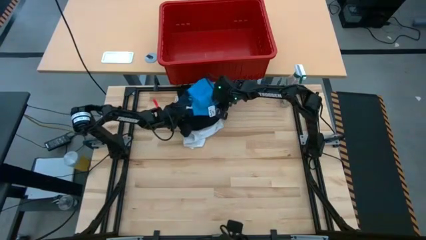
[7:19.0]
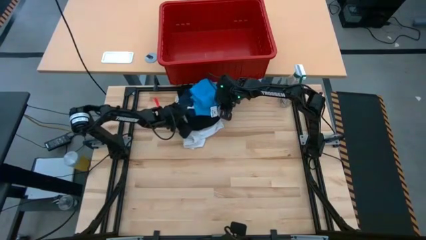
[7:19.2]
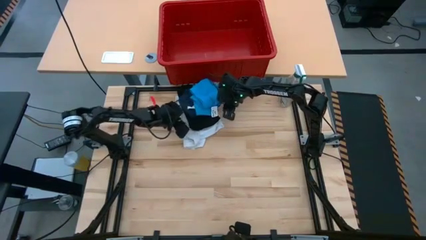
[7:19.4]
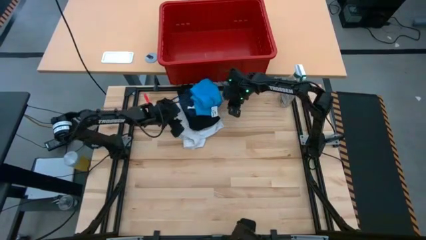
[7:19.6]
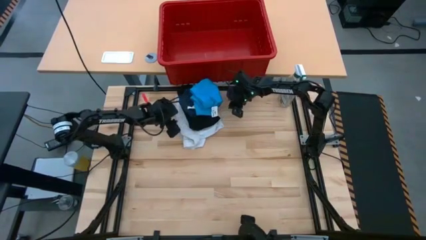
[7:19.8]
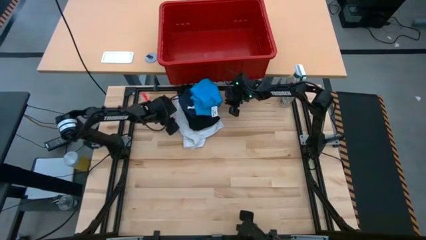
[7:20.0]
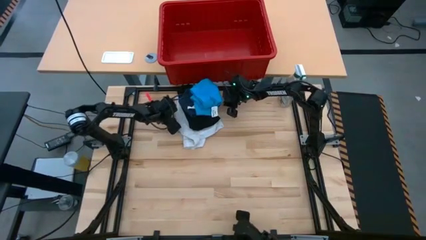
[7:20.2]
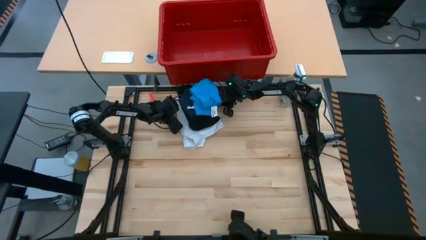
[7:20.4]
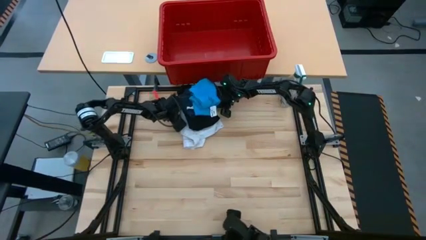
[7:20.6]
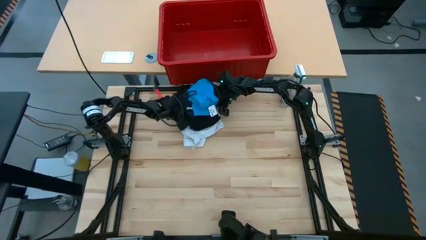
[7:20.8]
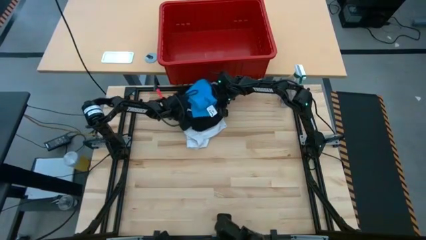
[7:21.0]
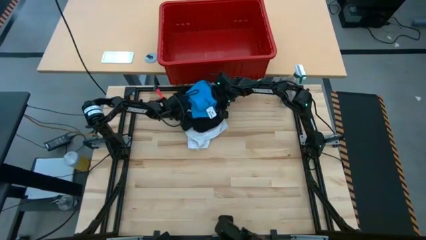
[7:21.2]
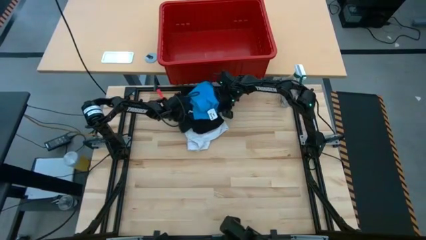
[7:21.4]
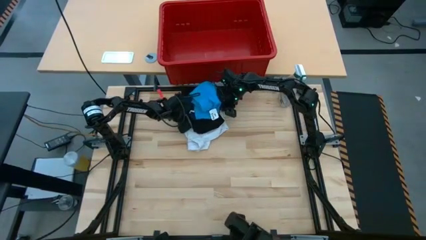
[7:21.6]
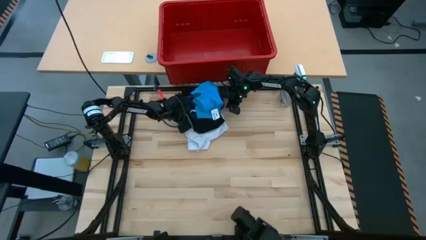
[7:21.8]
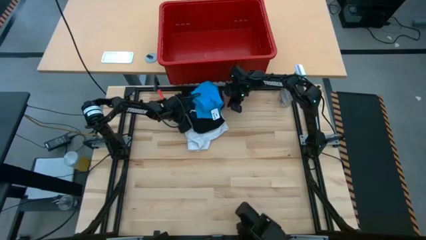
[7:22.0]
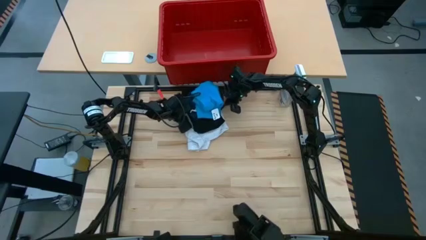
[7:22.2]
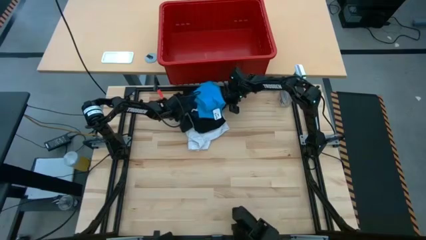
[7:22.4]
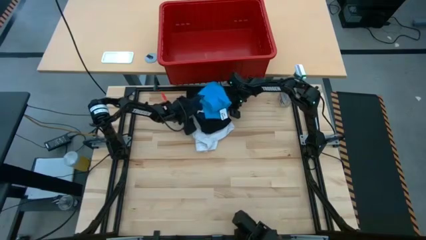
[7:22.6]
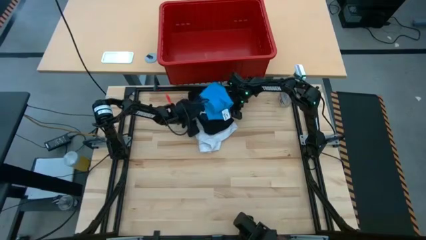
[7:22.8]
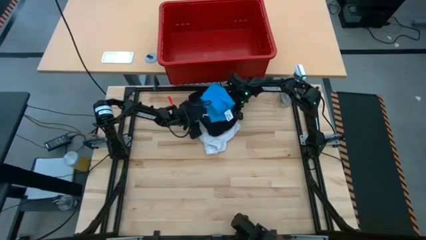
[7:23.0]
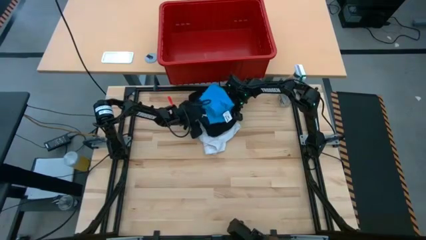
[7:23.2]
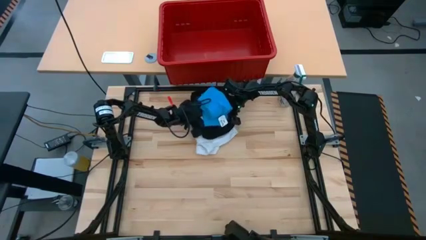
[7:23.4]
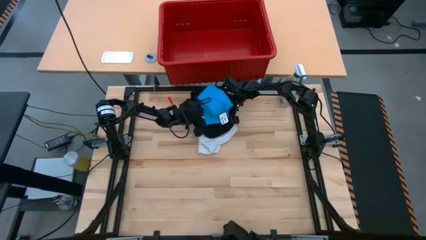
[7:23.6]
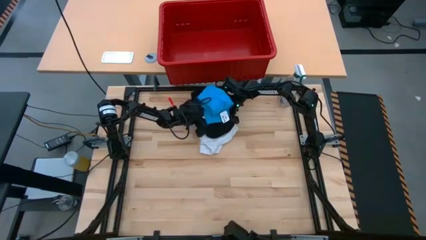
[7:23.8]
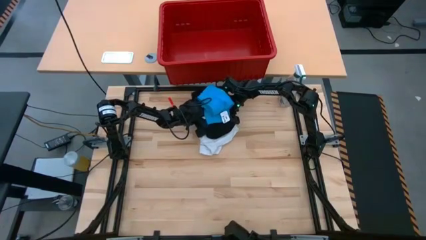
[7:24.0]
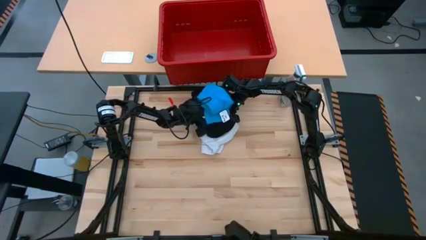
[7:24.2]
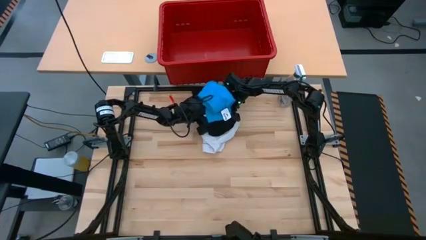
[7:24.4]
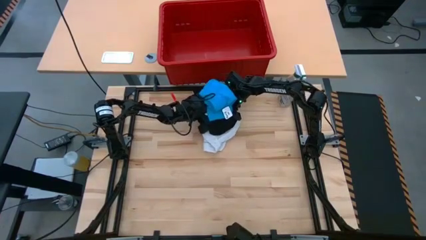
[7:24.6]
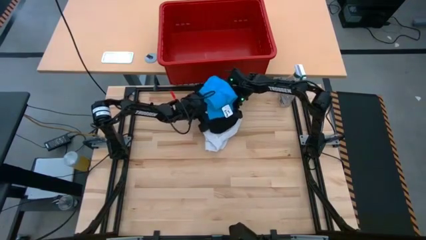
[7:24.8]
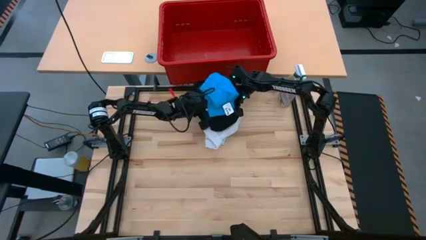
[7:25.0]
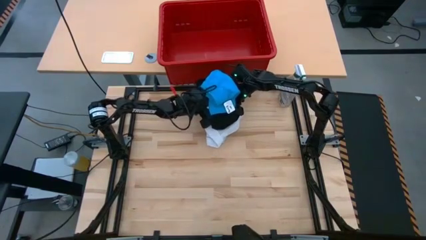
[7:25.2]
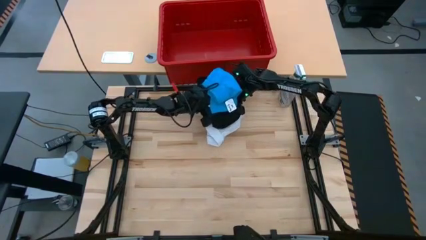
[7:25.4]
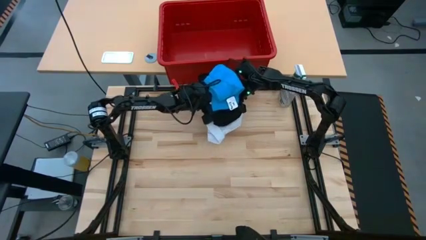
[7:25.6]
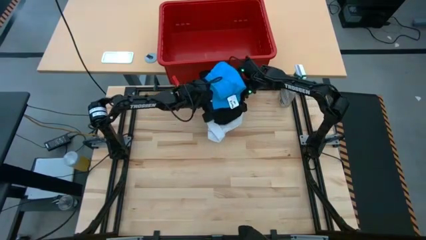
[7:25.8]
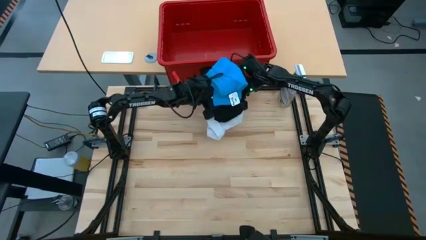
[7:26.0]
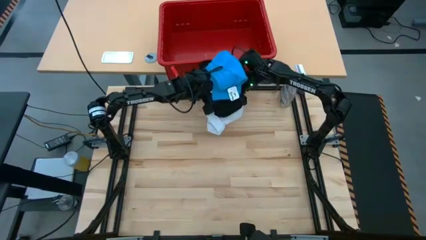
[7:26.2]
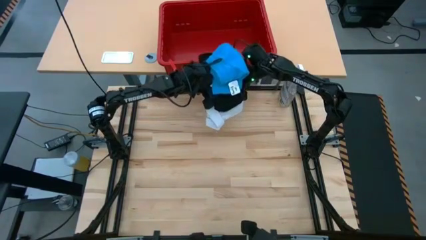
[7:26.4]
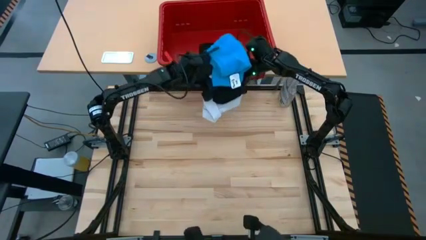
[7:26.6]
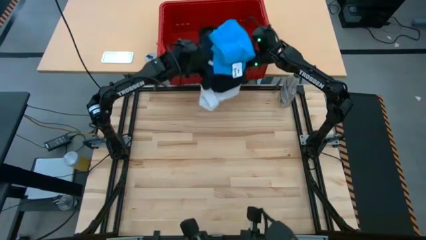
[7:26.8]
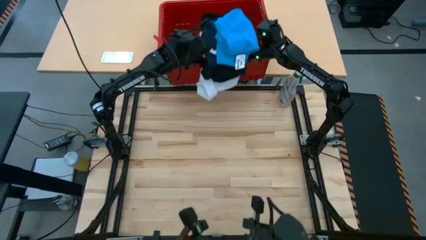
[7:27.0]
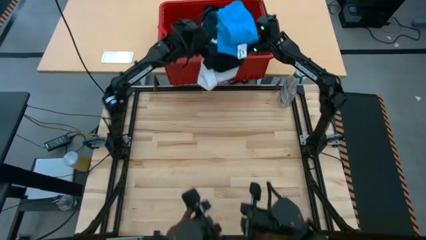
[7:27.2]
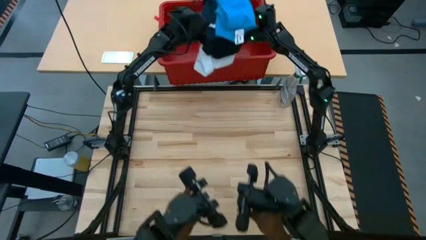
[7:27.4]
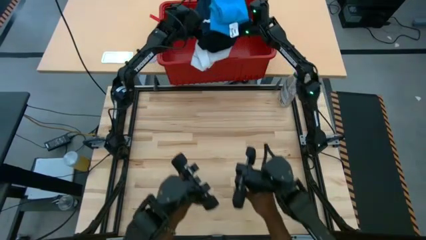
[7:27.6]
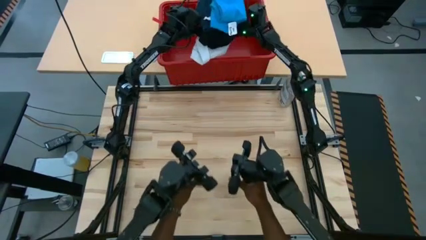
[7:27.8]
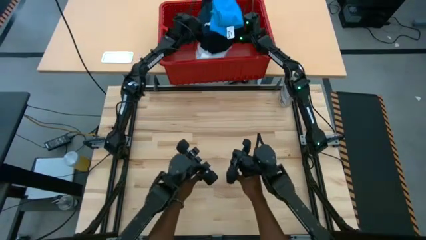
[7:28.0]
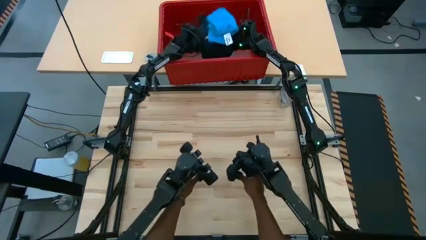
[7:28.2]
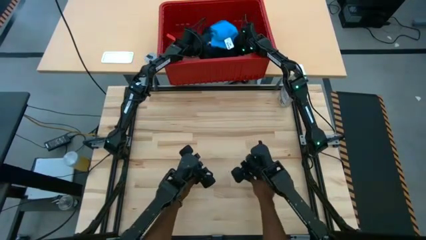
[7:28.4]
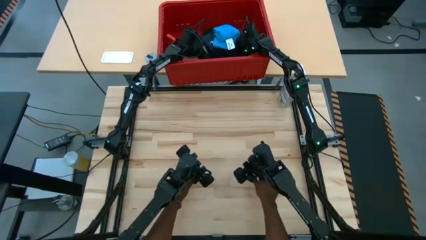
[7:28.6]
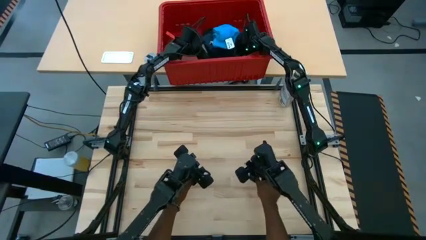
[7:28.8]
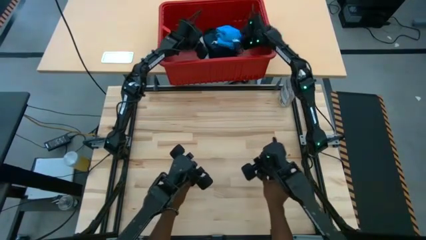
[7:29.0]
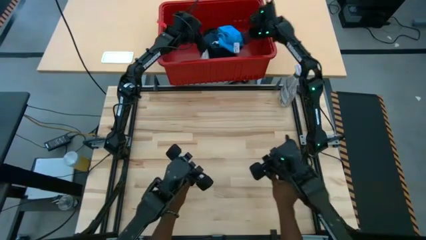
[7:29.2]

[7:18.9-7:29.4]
Task: Fold Laundry from Bin
Put all the stacked clothes into the red bin

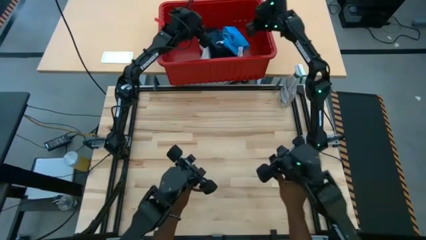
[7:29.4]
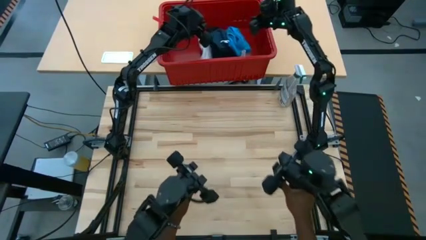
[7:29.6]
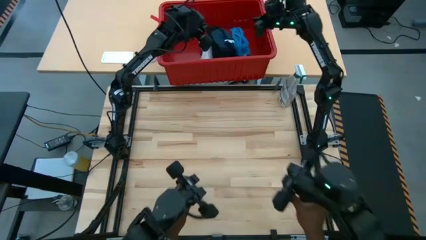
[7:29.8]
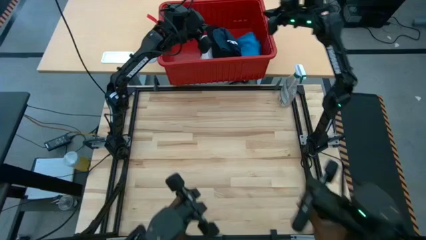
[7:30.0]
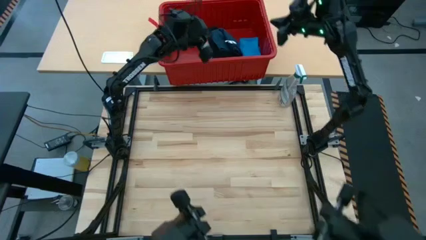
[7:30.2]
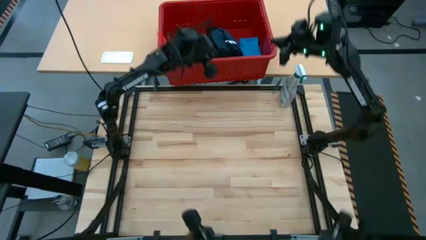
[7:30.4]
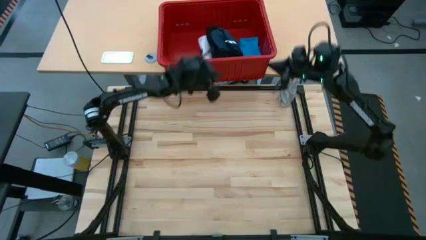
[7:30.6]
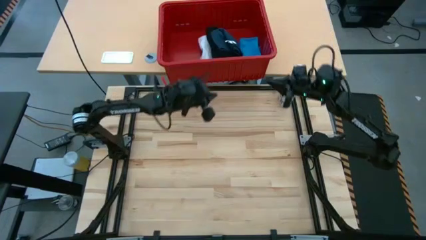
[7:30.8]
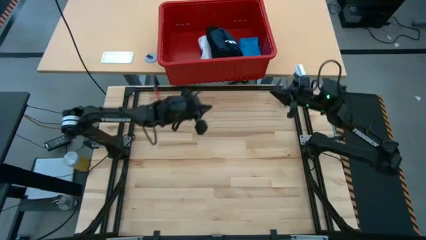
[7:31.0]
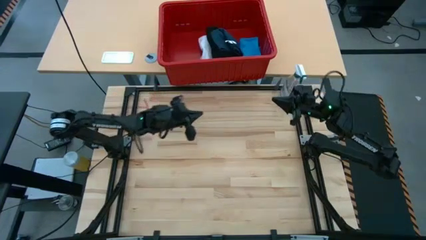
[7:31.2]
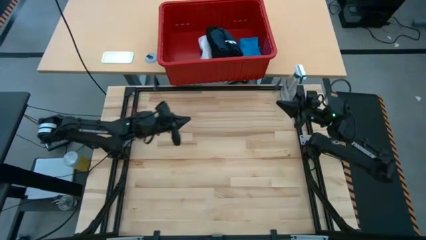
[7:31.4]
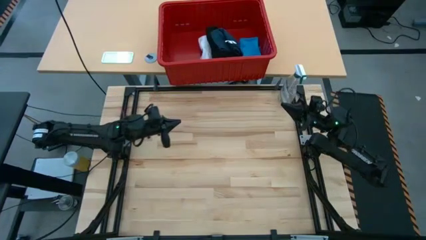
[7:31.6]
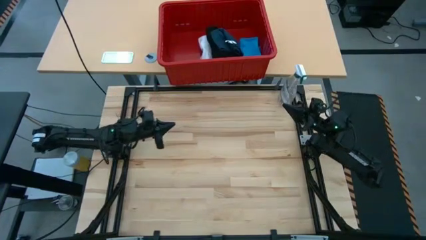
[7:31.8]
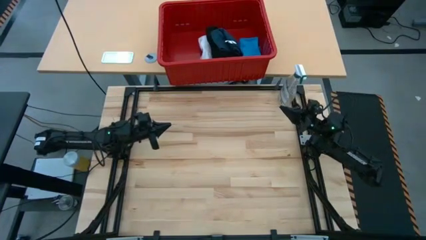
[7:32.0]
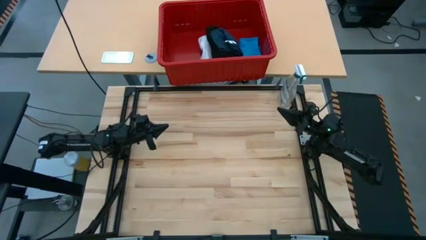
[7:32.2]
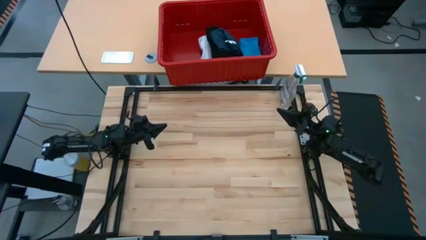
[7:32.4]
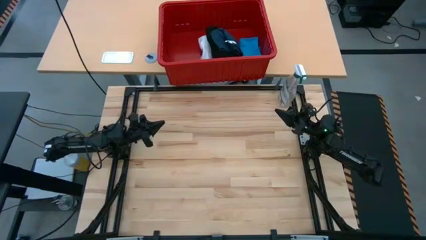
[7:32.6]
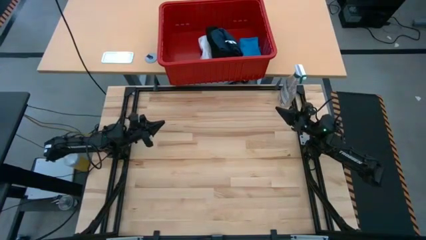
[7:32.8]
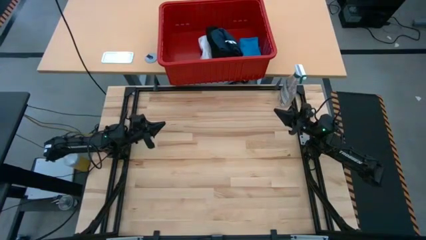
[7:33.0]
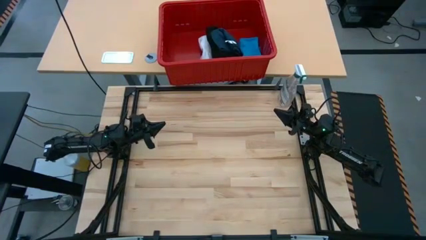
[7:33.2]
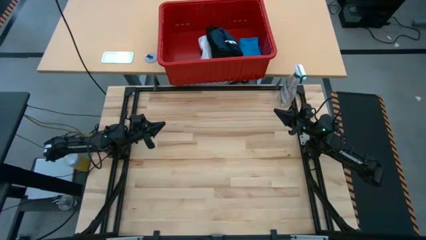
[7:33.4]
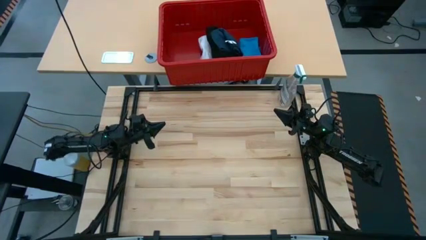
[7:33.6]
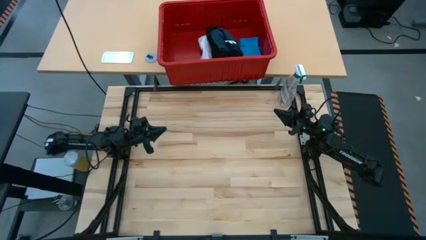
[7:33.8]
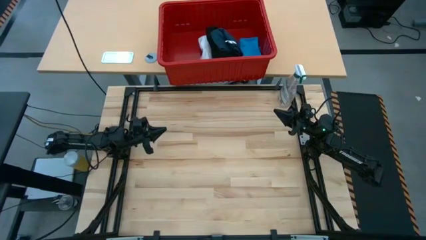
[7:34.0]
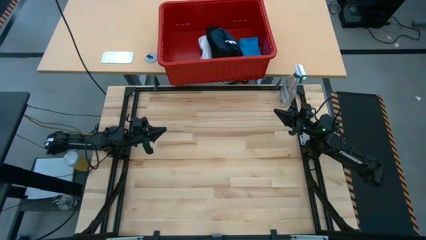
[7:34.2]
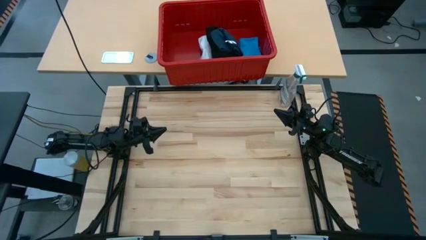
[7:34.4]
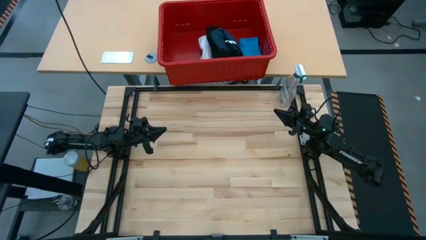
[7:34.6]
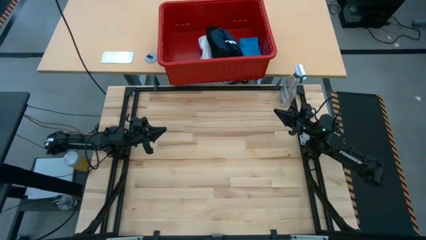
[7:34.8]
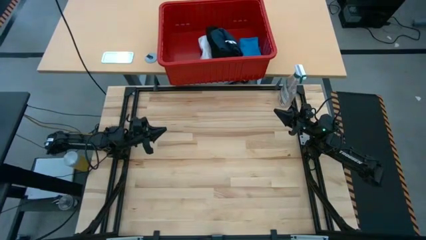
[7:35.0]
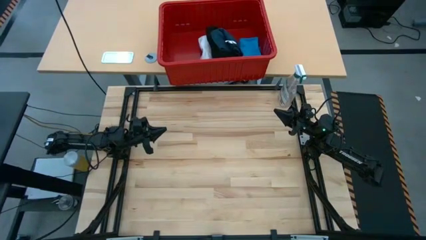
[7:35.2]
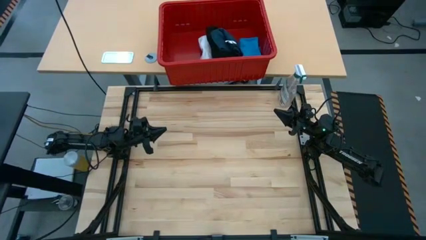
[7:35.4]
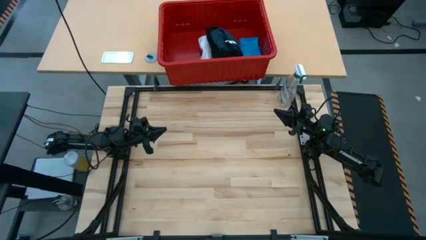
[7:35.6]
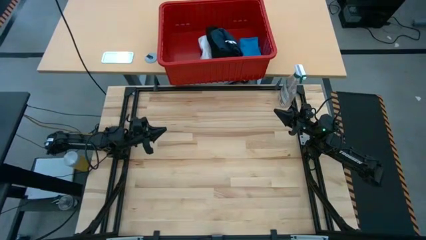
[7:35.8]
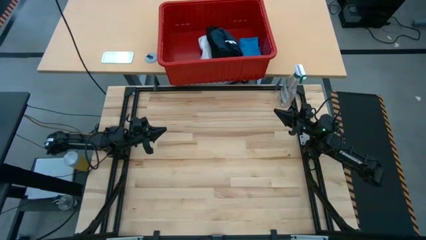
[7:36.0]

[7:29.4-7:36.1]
Return to Home Position
